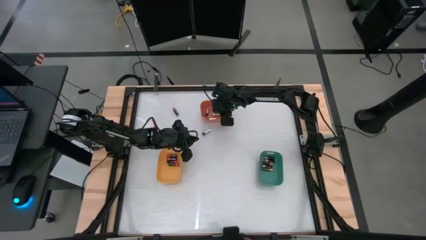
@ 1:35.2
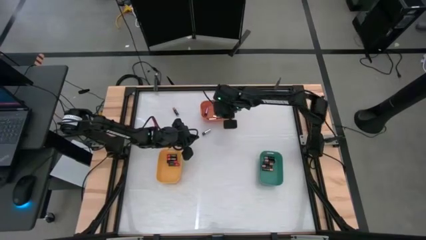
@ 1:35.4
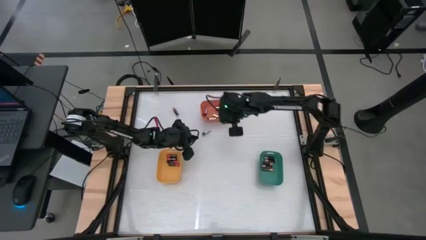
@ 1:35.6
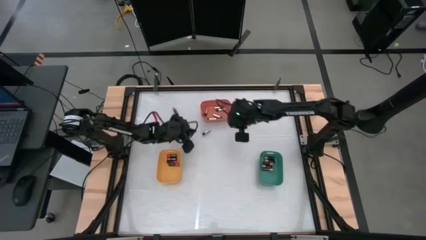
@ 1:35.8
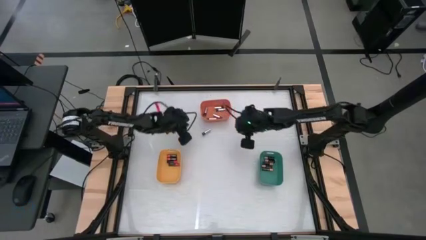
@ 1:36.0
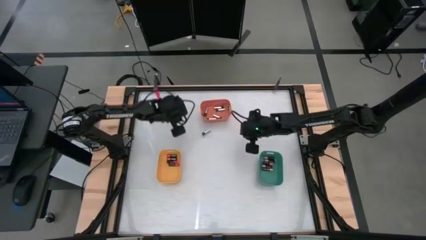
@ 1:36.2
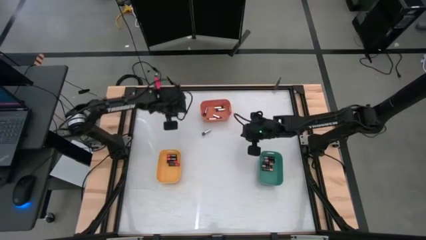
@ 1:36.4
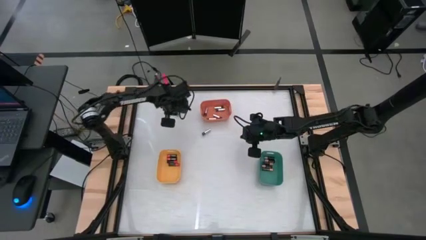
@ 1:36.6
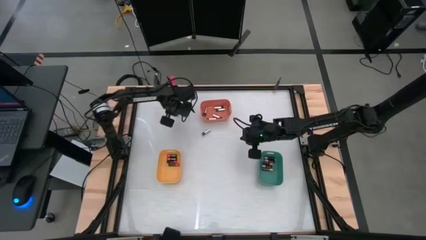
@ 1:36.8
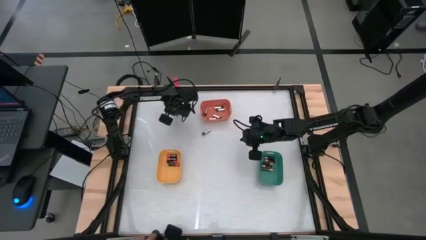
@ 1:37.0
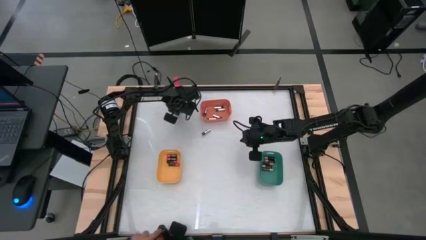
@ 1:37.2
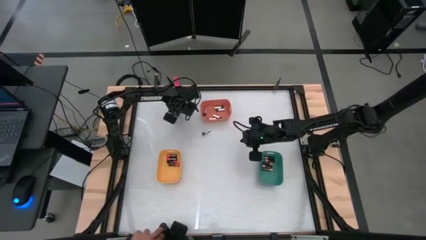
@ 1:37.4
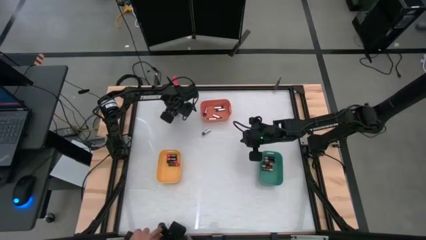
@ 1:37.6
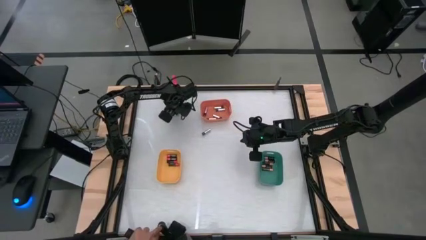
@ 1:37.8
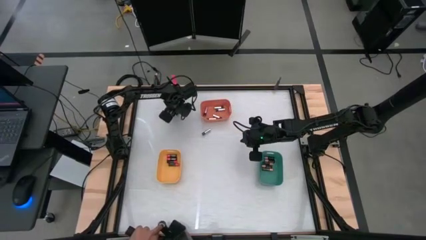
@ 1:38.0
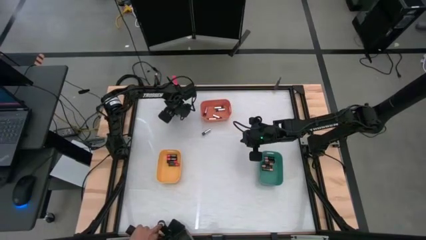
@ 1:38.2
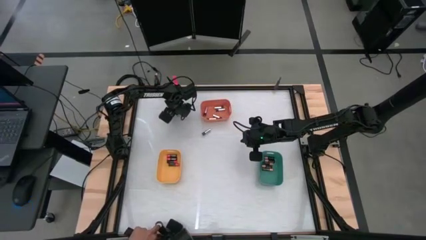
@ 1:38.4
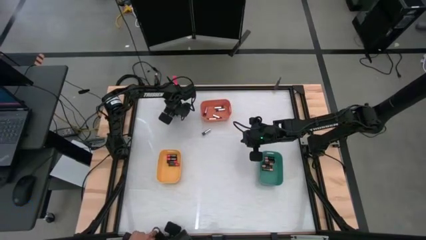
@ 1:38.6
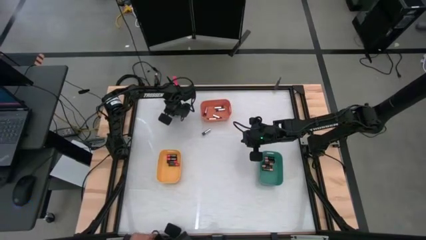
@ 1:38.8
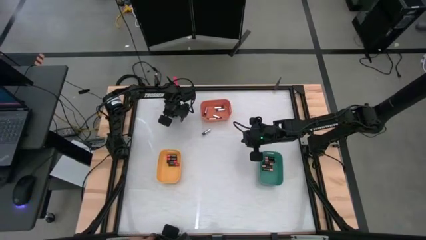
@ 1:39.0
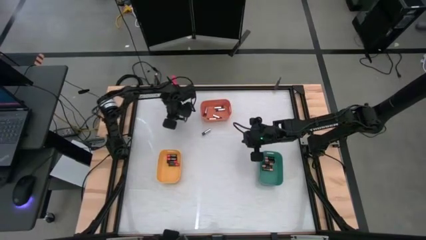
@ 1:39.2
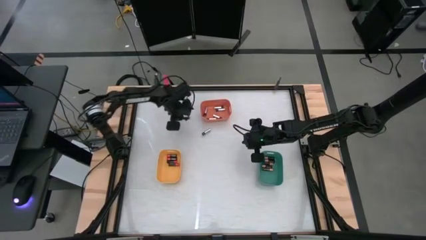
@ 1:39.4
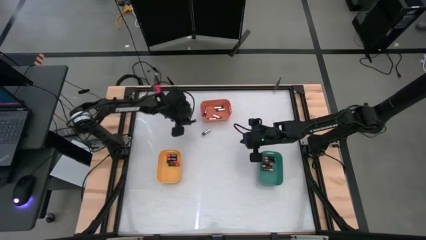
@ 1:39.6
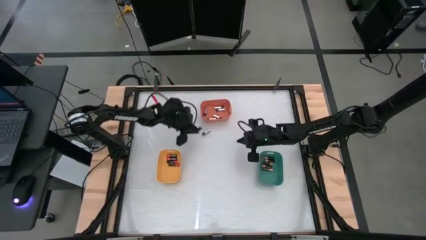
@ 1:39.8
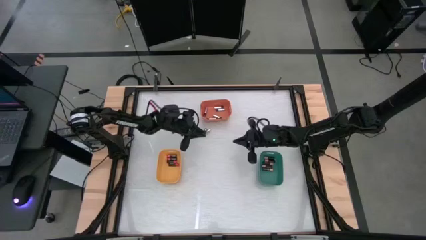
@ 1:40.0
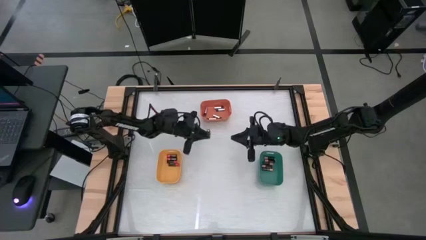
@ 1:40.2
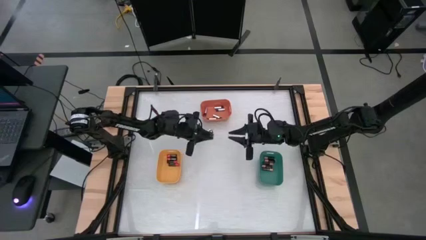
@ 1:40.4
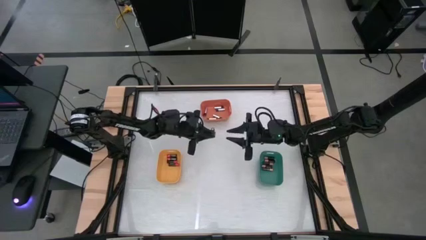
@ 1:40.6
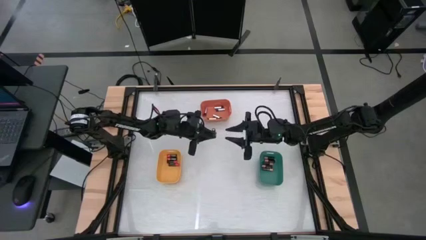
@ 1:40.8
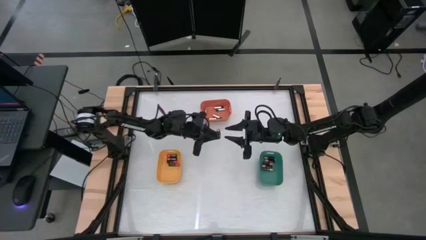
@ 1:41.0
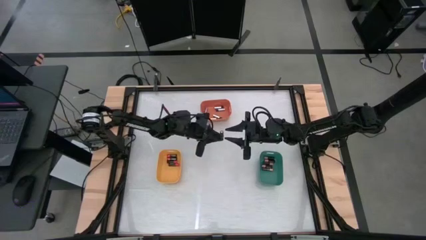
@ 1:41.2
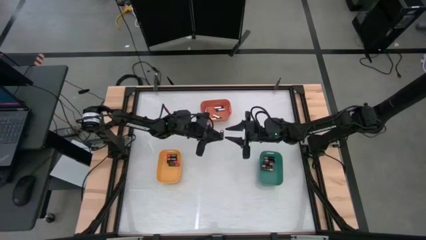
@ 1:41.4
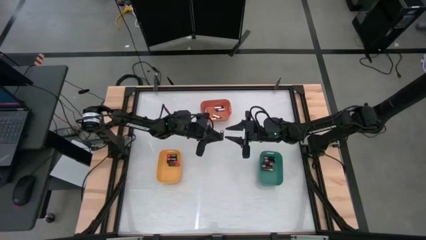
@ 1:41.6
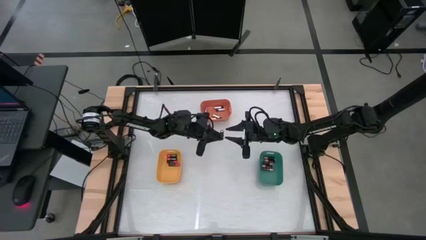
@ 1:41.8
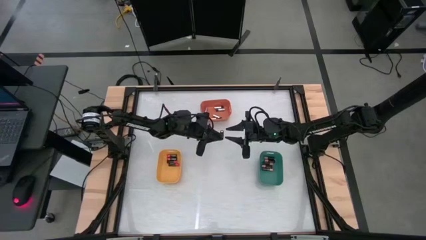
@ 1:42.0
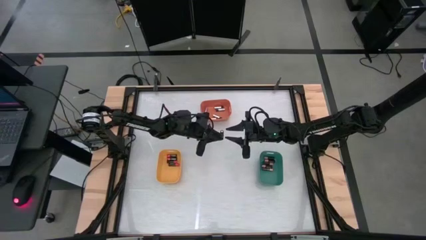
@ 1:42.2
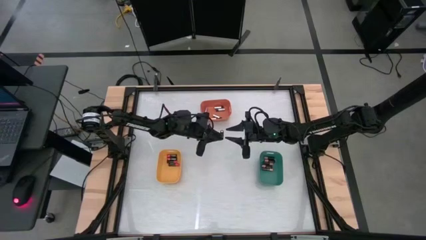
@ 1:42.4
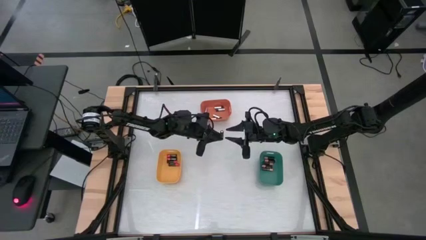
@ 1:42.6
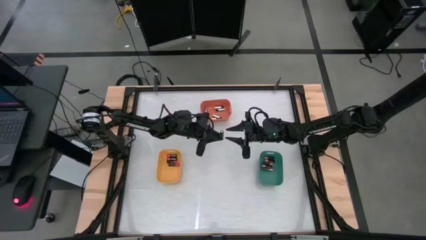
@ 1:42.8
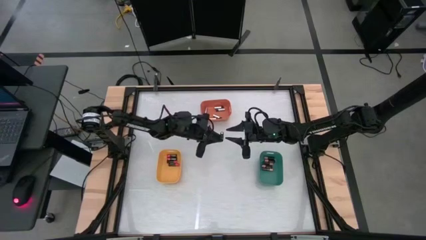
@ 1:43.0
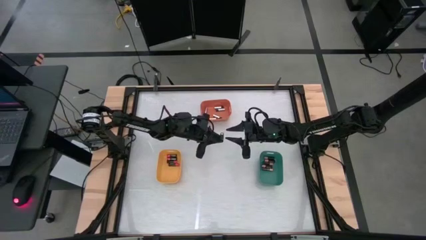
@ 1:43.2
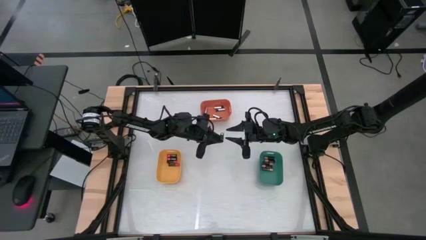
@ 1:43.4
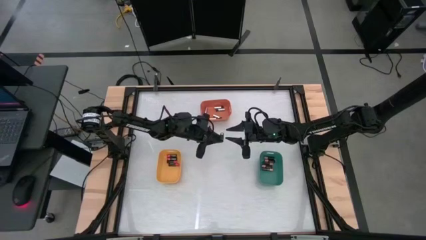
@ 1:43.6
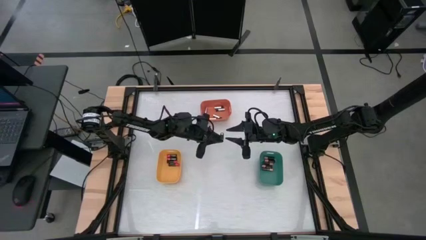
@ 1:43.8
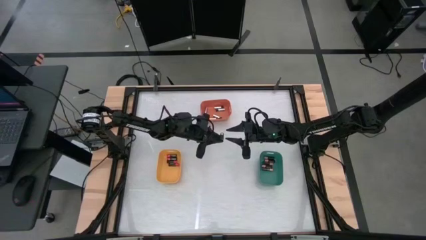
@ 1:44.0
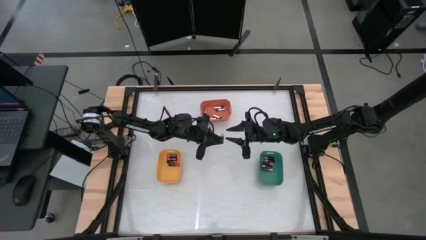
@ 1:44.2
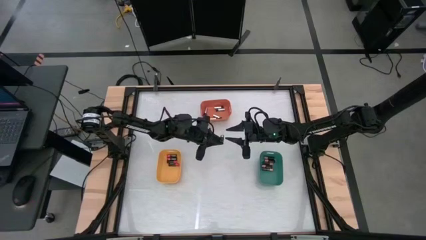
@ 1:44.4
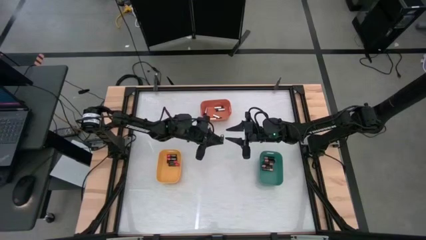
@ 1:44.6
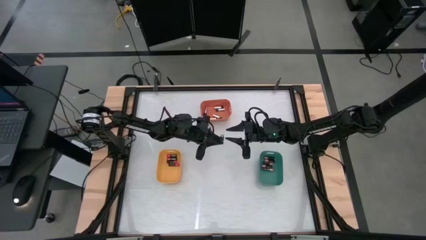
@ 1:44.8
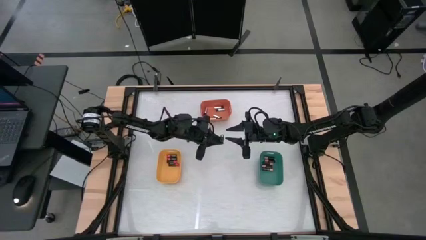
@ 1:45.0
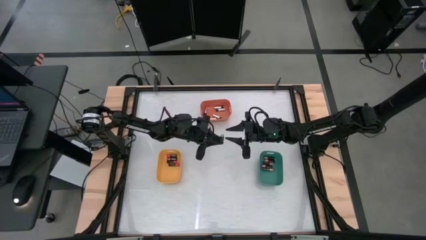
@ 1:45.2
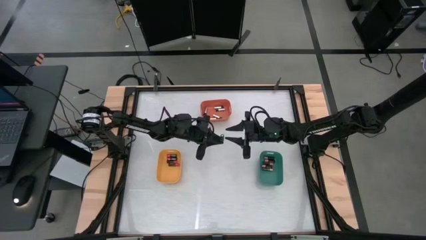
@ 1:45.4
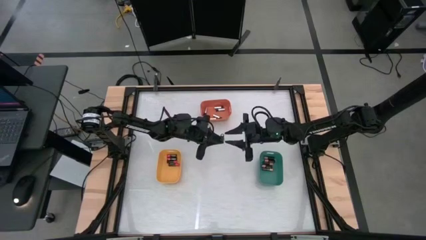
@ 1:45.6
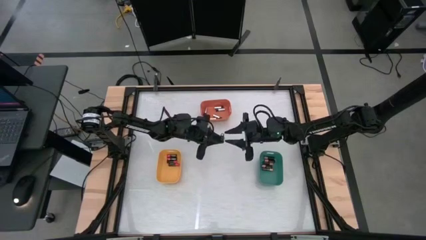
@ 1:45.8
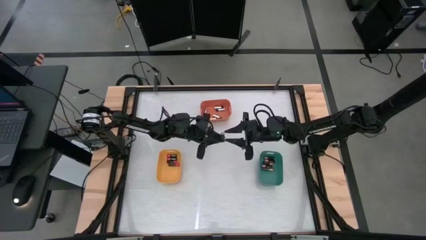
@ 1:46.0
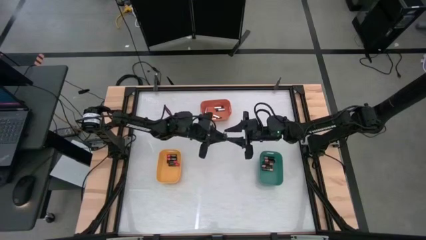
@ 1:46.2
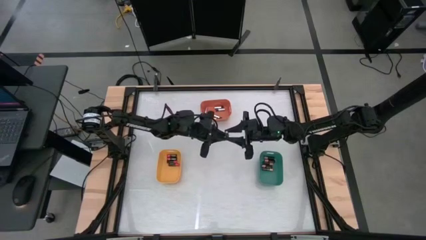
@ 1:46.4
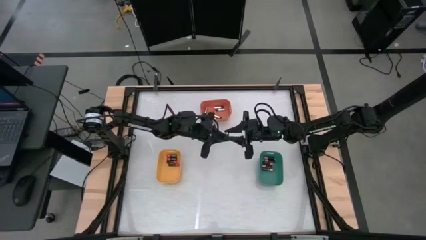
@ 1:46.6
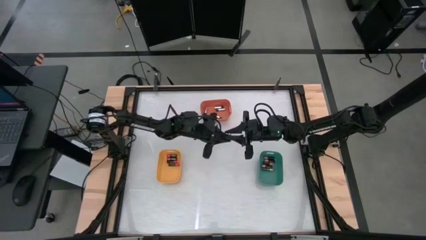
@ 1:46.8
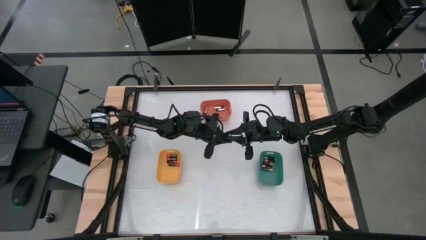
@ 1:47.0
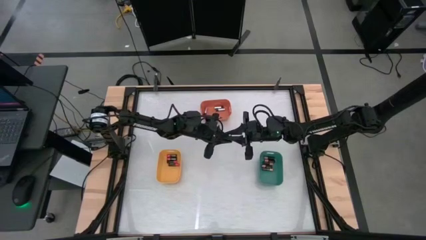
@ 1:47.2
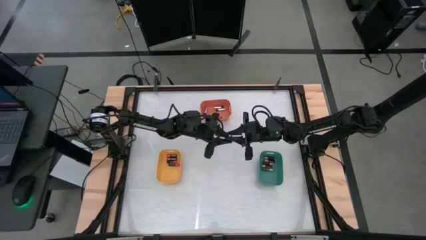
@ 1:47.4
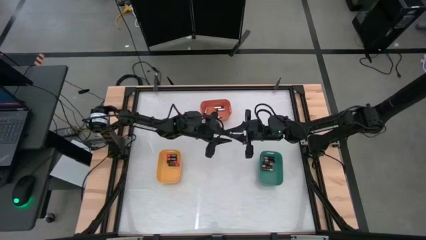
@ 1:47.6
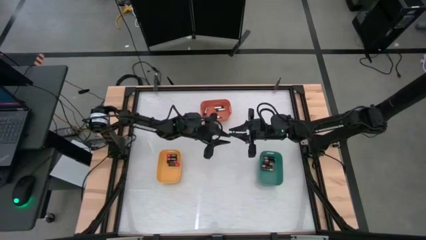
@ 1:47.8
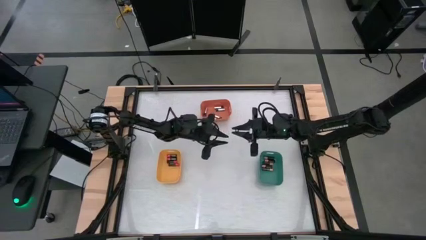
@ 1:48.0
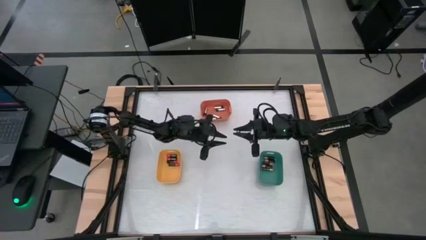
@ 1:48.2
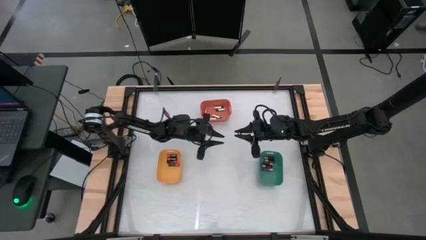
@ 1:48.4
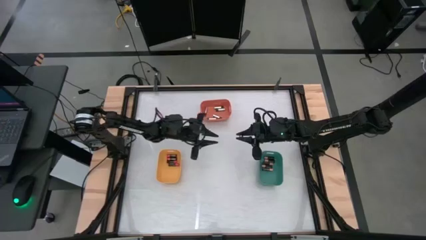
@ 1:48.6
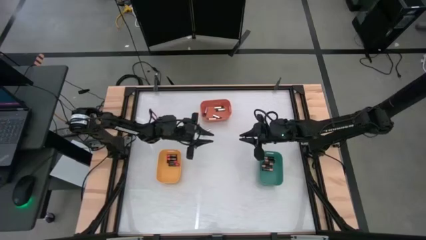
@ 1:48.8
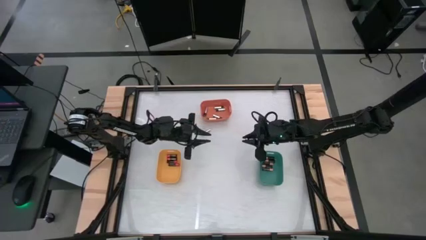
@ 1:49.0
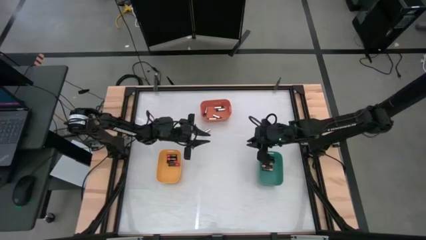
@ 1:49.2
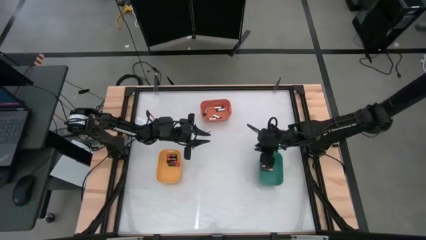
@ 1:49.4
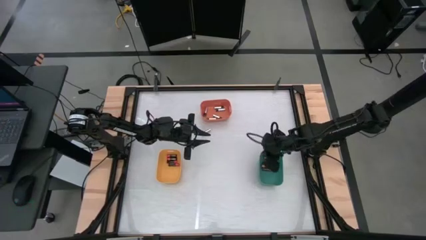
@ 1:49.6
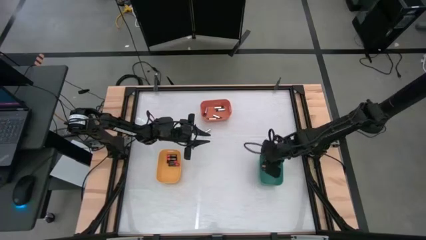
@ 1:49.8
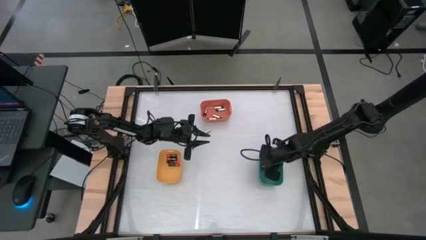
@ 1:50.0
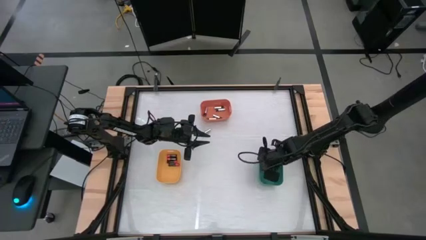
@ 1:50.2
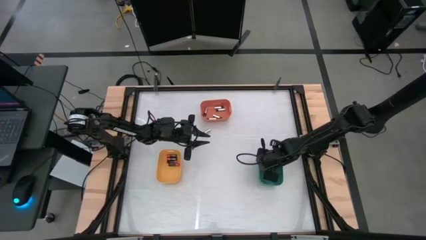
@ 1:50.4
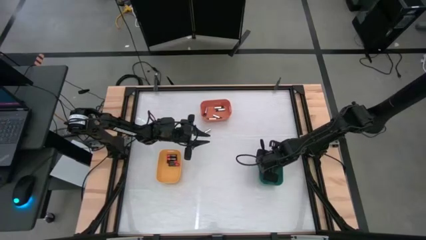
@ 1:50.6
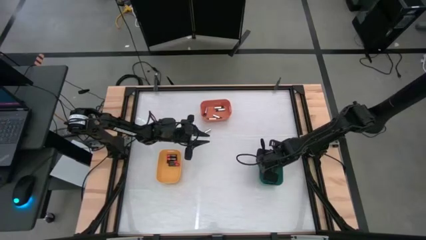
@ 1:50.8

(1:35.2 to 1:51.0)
Task: Sort batteries
Put the brown battery into the green bin
